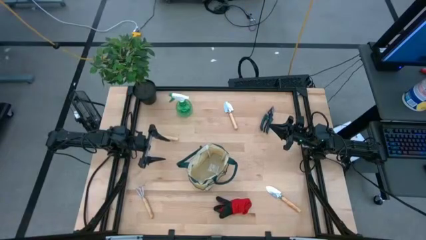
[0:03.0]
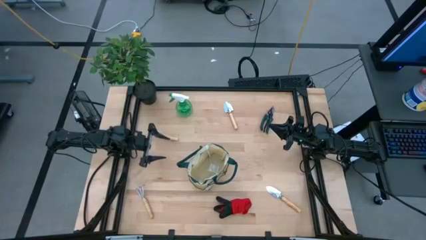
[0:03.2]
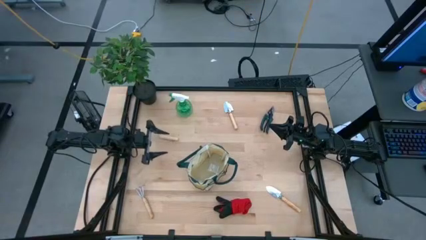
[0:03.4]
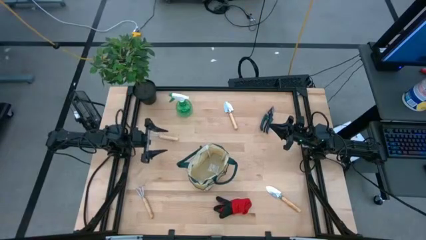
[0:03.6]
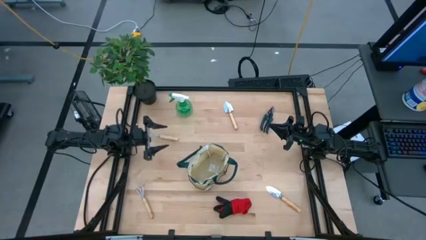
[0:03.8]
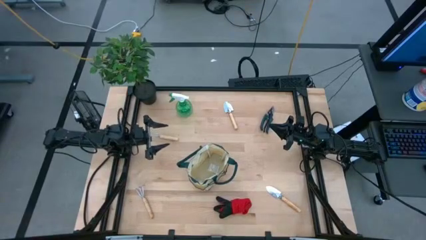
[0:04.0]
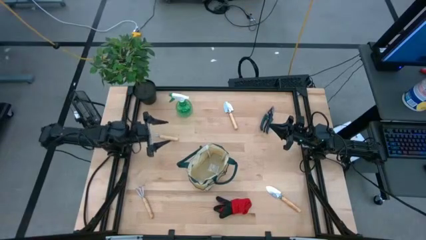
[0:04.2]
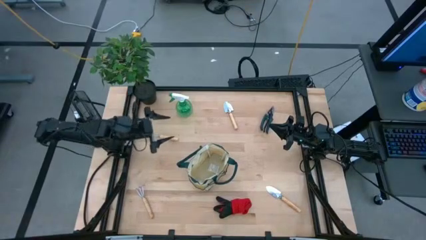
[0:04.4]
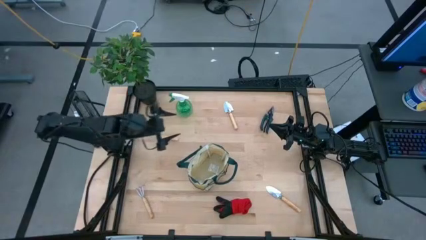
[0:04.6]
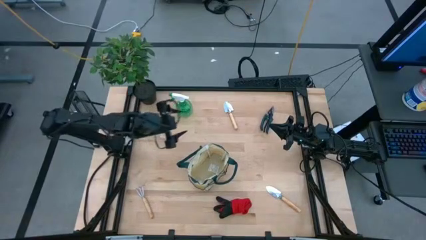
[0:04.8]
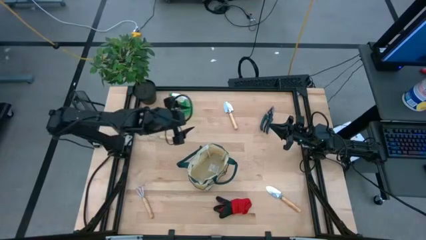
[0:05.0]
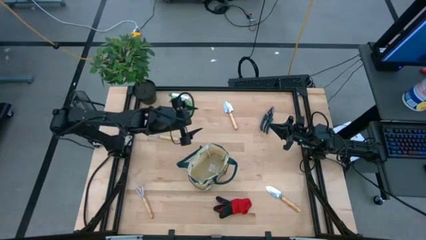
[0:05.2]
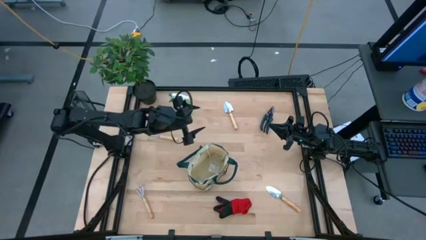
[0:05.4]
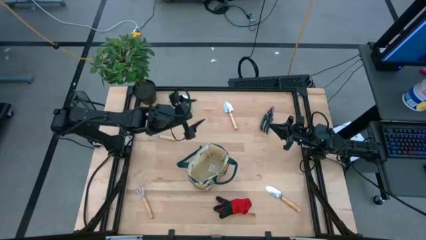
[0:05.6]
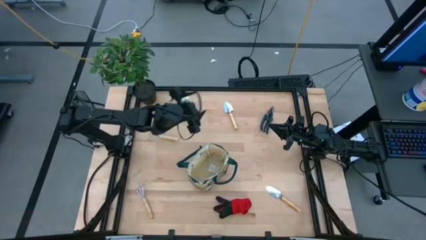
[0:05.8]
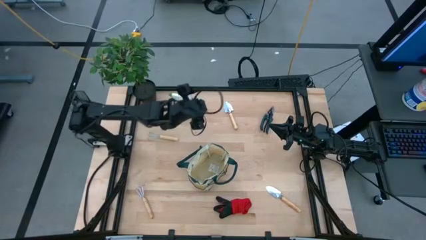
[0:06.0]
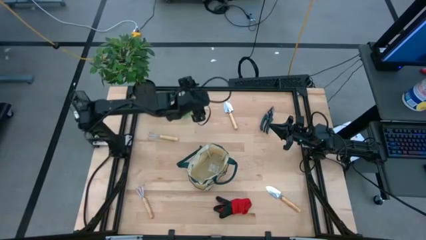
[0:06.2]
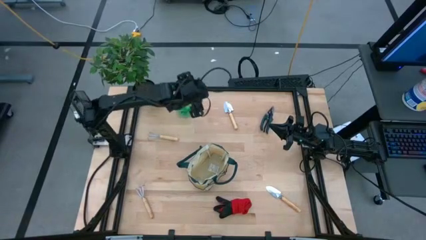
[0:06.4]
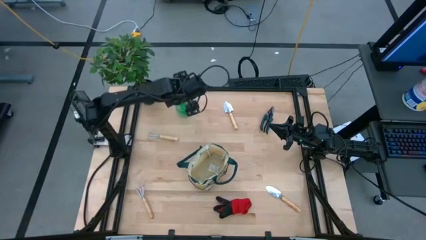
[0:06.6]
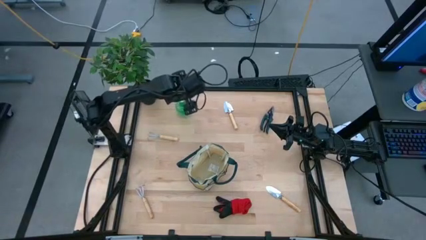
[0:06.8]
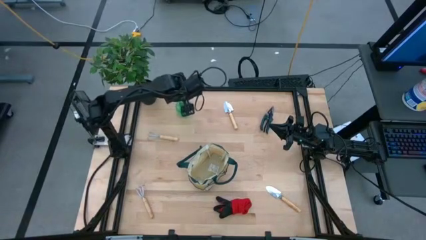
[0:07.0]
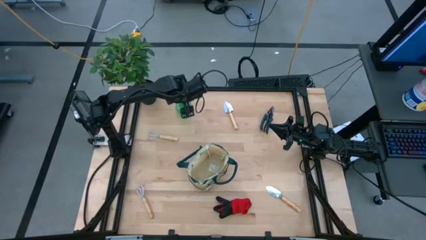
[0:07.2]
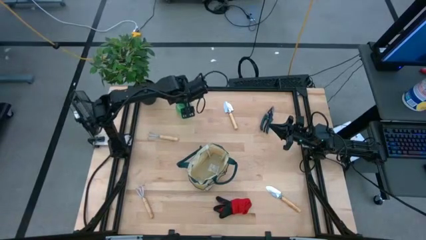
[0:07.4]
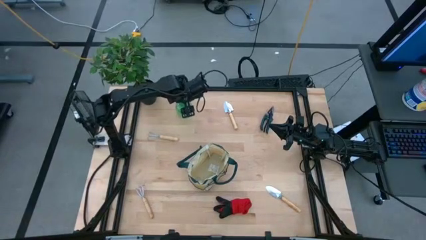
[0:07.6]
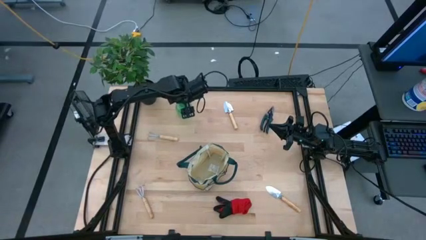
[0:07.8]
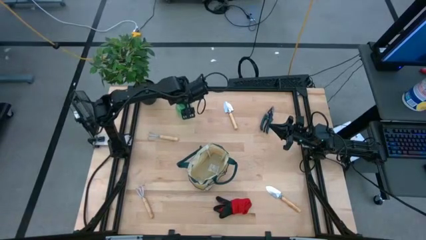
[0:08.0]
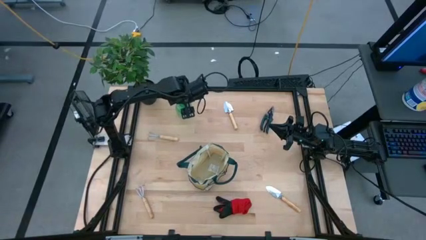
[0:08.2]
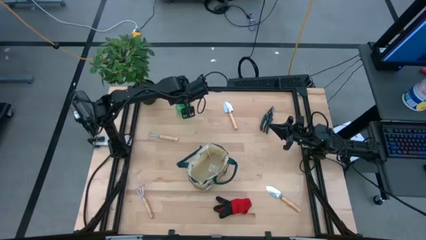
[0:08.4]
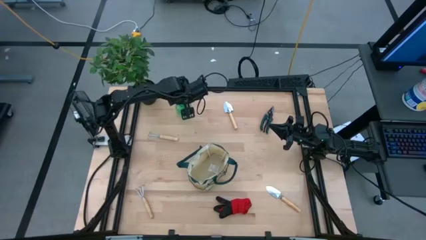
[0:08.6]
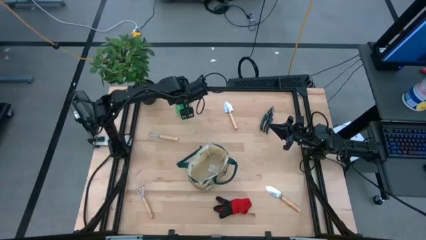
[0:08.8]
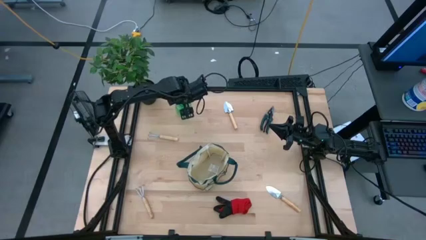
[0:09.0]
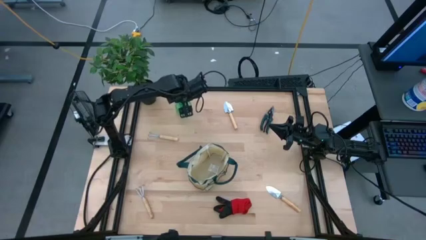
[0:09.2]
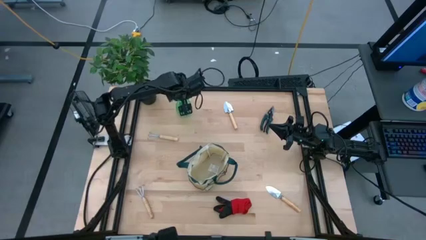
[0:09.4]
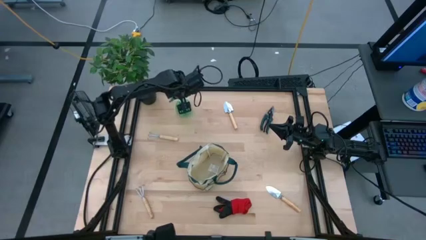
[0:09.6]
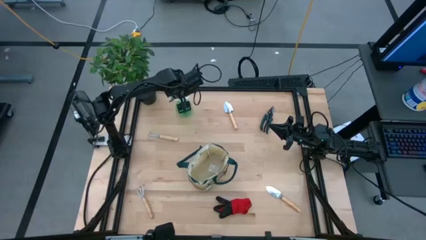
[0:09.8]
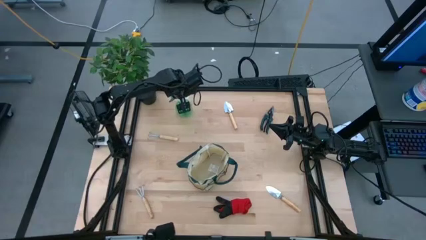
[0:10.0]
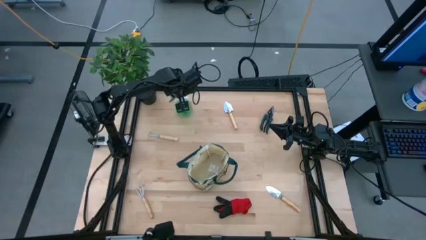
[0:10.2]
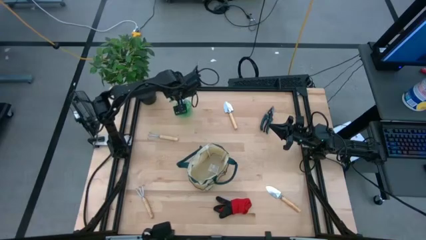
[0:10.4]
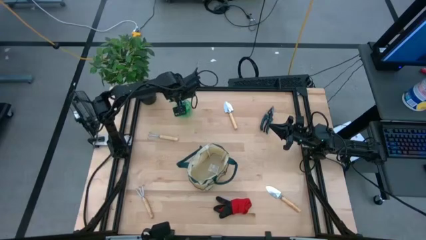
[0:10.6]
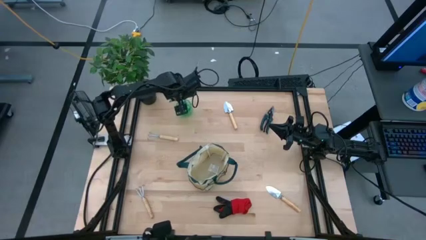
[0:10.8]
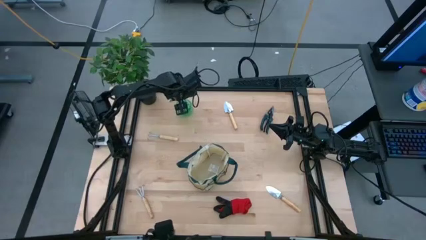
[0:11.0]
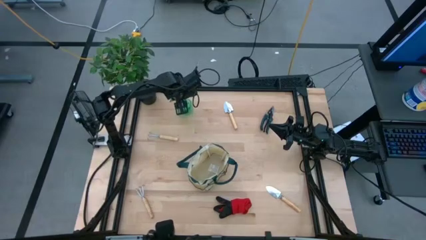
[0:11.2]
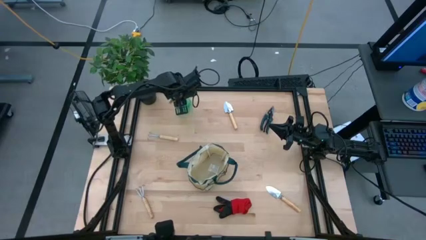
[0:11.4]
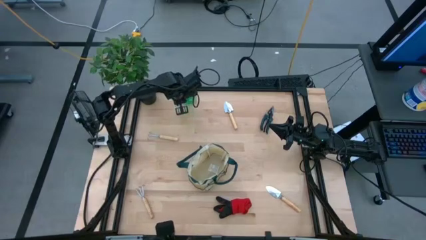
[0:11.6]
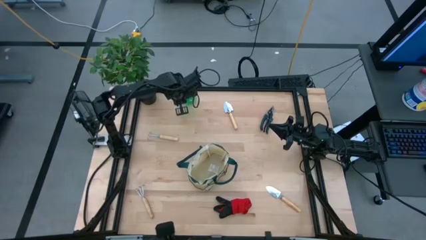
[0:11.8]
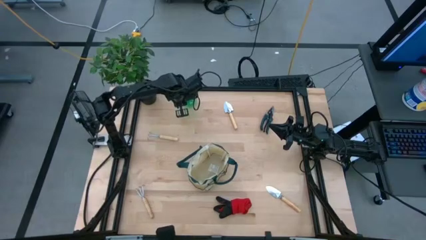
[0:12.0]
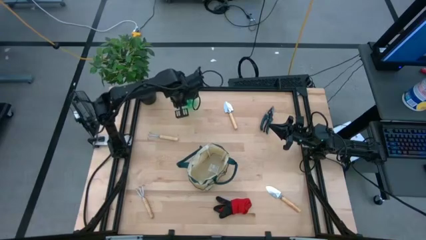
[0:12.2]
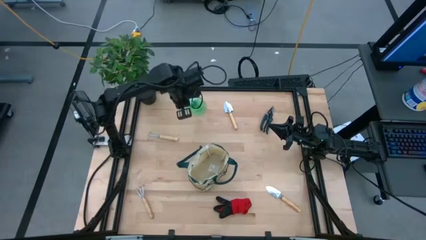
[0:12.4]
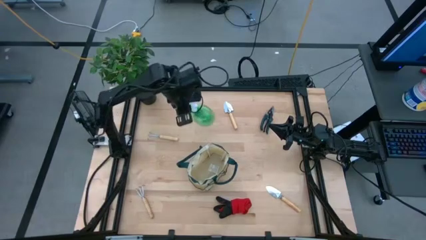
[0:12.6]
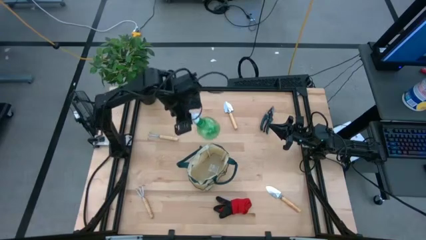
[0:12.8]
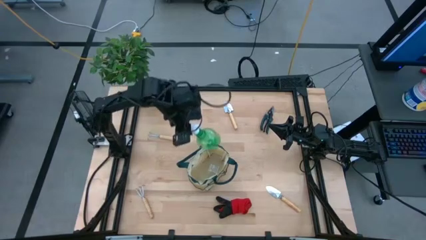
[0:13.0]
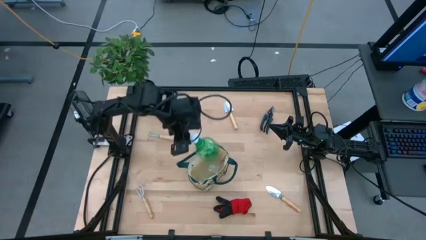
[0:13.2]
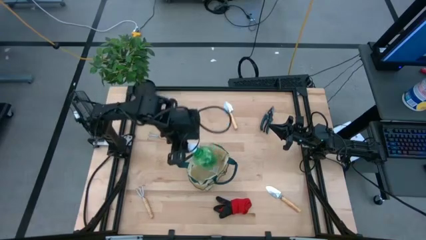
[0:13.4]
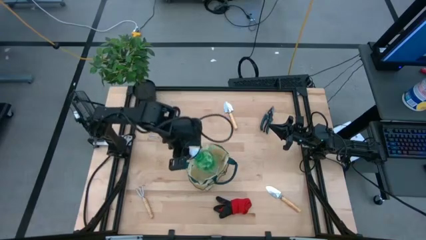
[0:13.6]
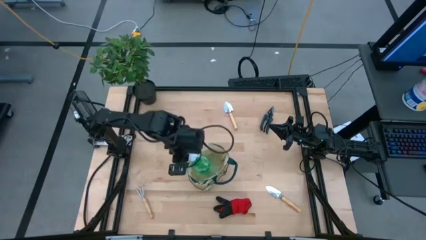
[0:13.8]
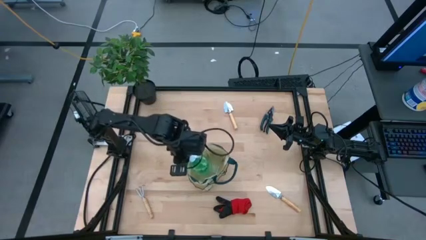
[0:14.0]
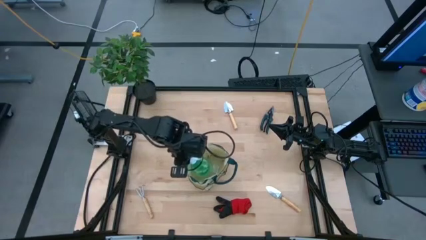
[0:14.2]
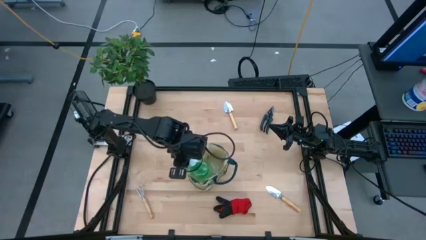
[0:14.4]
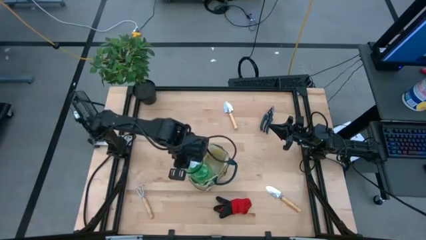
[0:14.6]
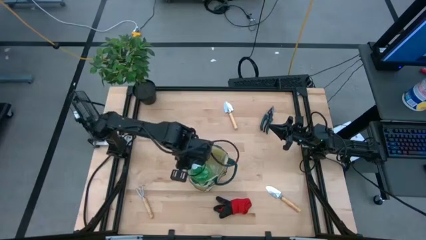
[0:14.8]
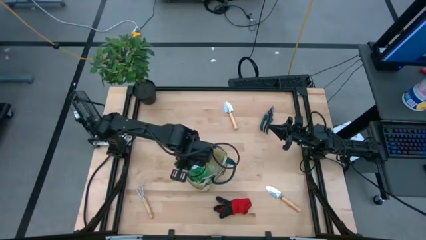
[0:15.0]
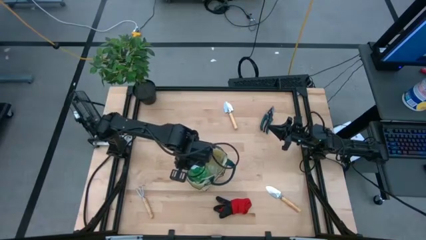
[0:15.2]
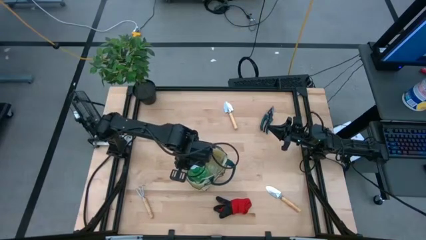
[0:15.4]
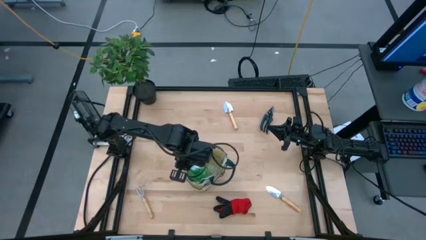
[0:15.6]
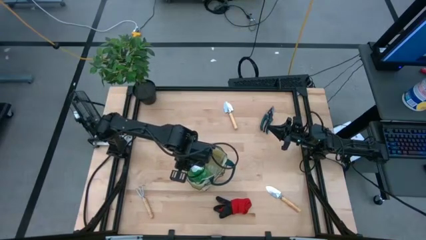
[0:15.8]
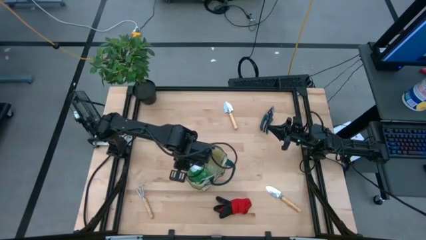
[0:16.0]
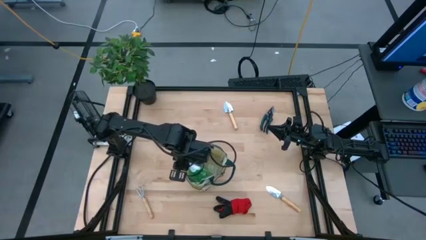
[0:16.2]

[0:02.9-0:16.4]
Task: Pick & Place Garden tools in Gardening bag
Put the spray bottle into the gardening bag
